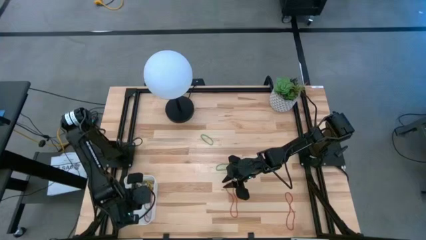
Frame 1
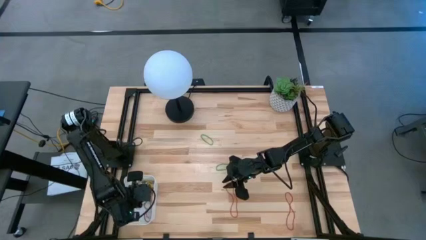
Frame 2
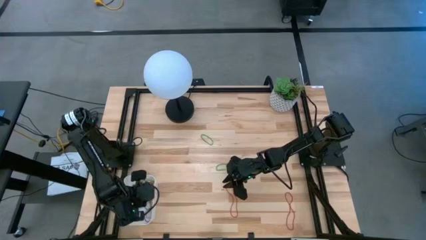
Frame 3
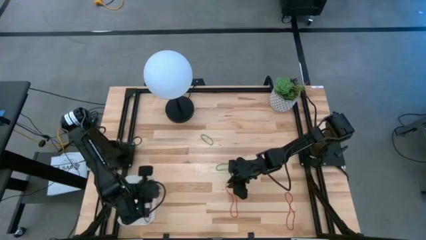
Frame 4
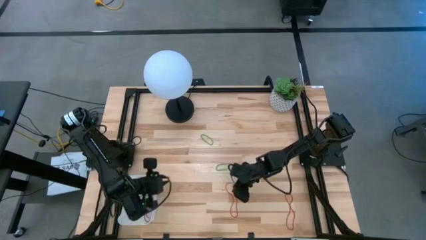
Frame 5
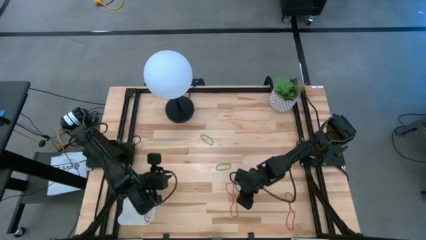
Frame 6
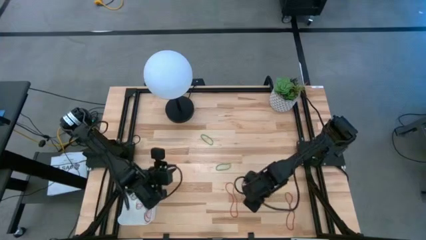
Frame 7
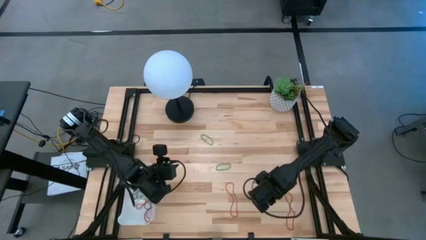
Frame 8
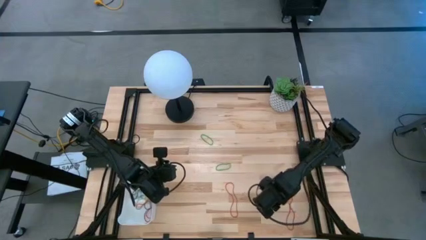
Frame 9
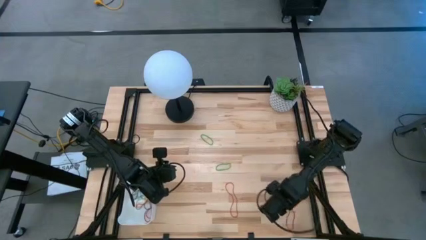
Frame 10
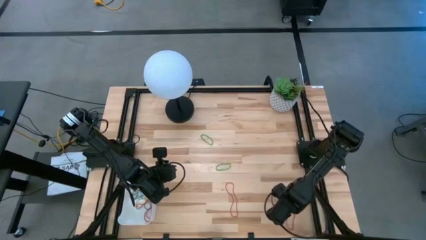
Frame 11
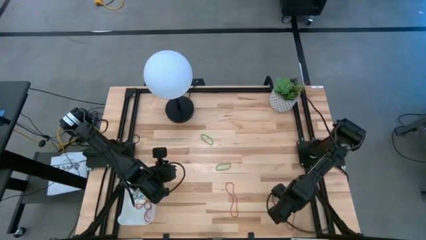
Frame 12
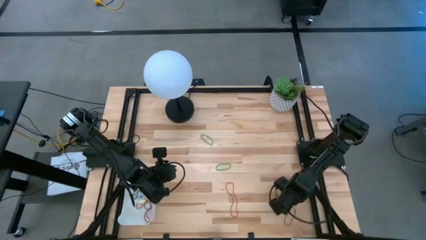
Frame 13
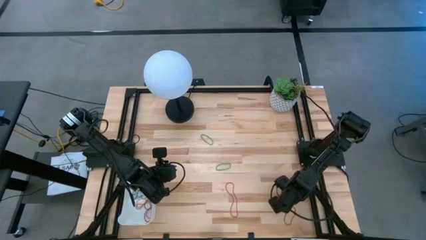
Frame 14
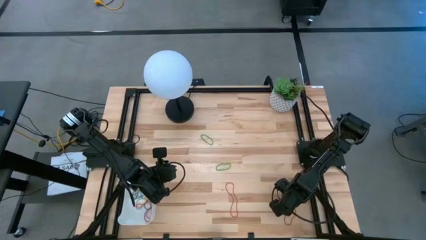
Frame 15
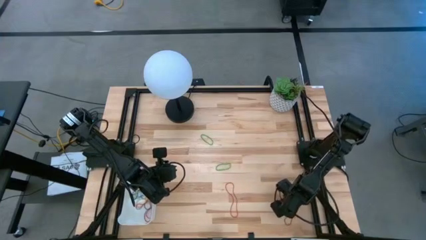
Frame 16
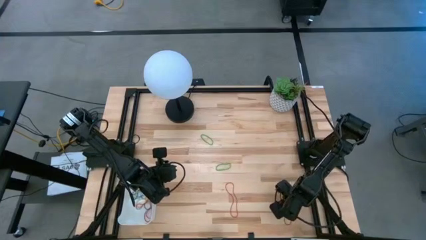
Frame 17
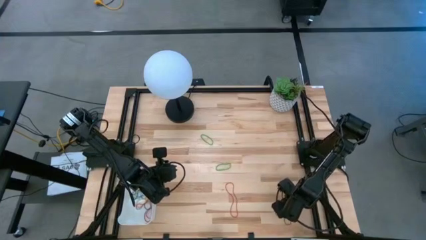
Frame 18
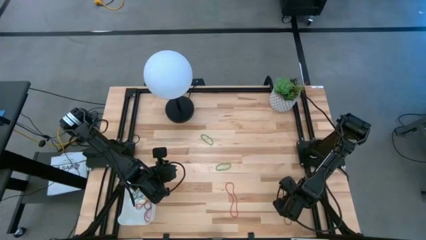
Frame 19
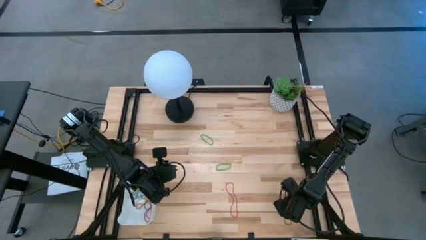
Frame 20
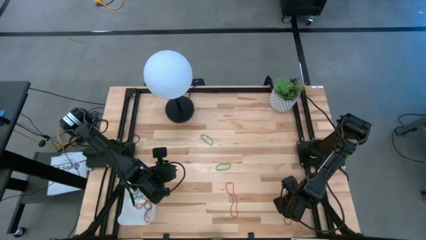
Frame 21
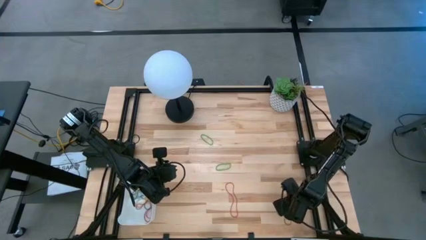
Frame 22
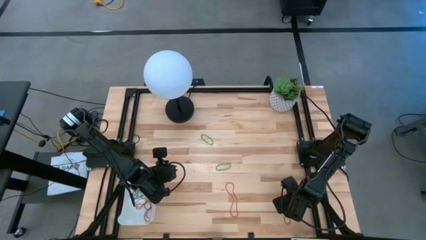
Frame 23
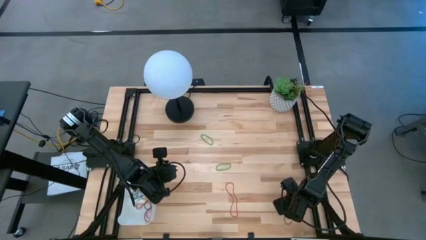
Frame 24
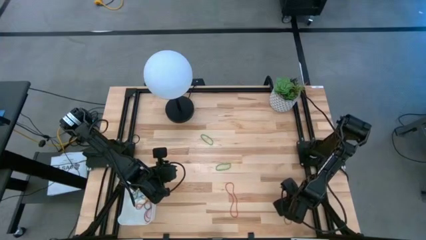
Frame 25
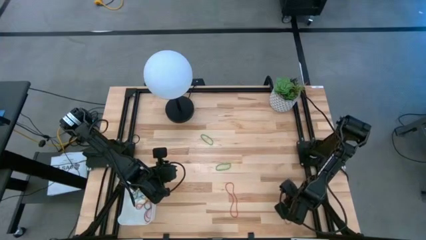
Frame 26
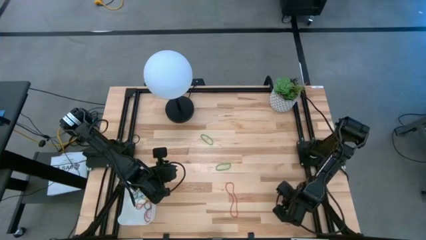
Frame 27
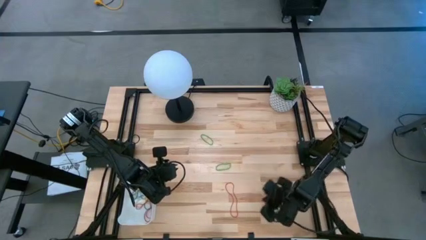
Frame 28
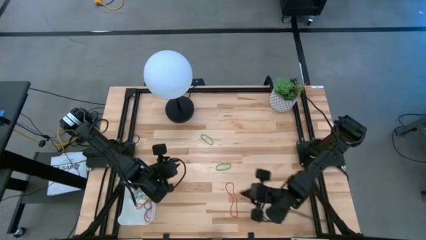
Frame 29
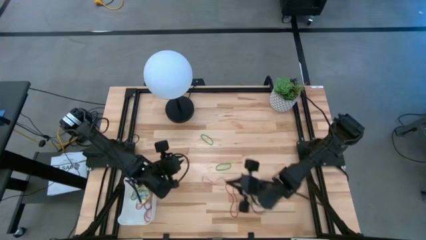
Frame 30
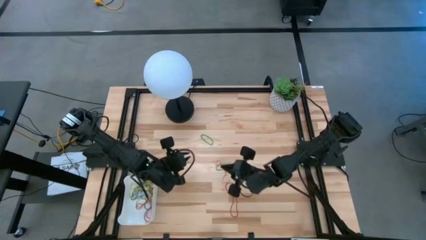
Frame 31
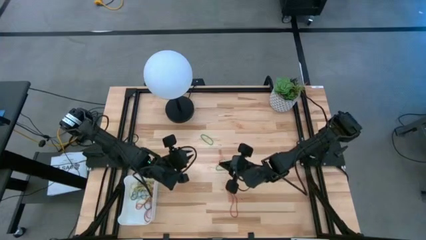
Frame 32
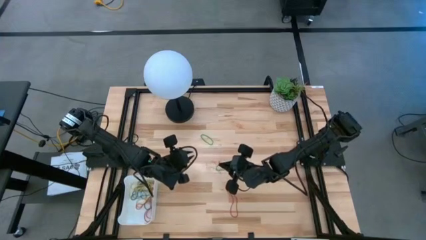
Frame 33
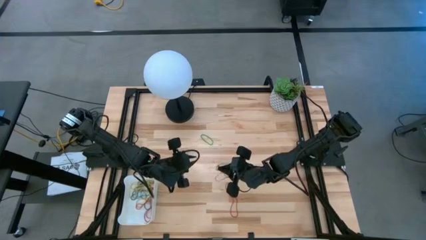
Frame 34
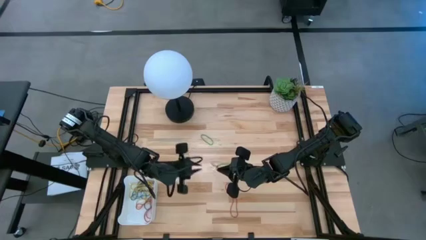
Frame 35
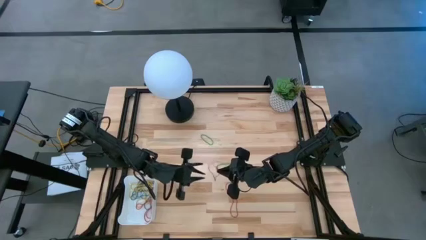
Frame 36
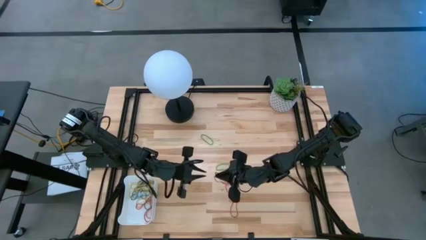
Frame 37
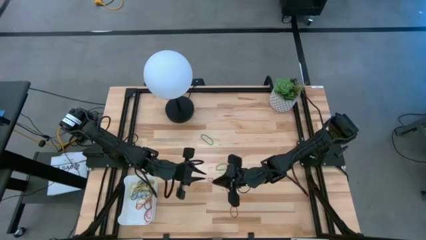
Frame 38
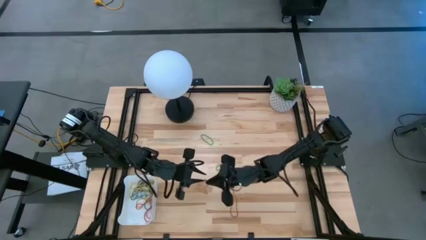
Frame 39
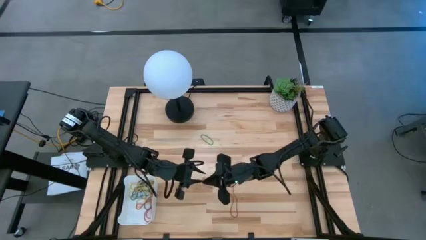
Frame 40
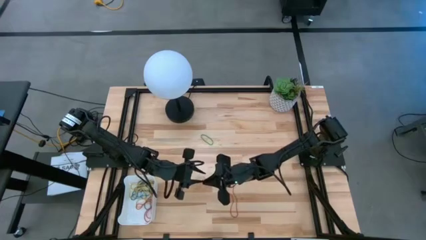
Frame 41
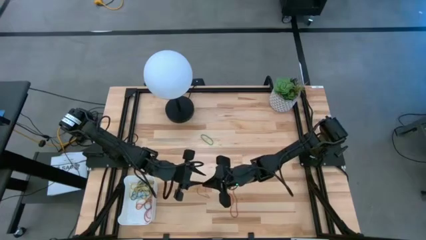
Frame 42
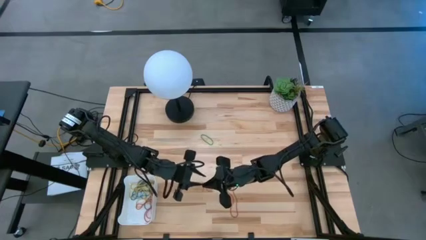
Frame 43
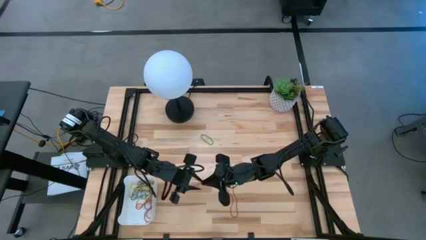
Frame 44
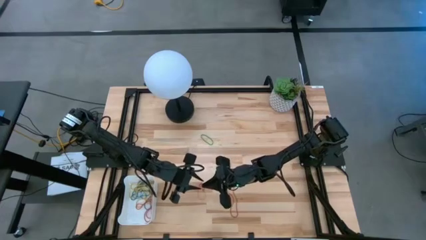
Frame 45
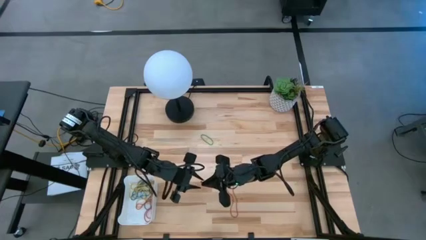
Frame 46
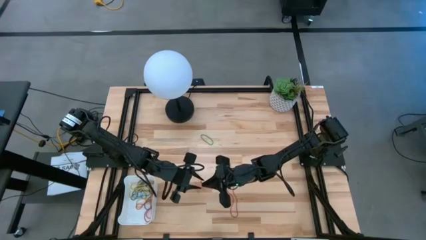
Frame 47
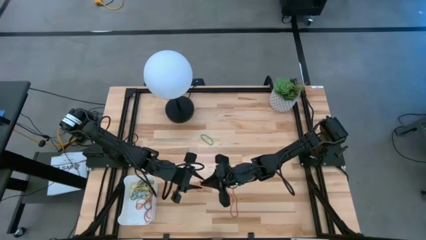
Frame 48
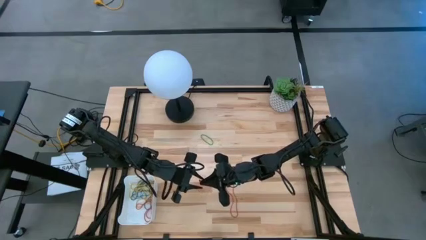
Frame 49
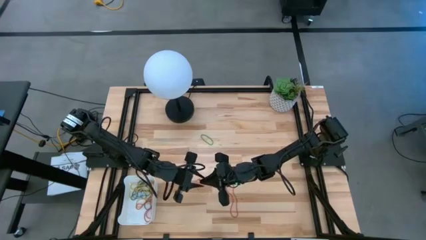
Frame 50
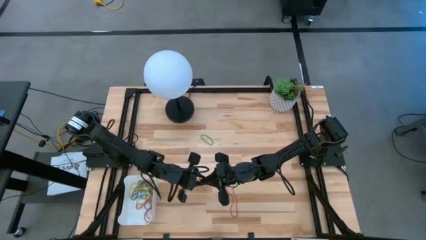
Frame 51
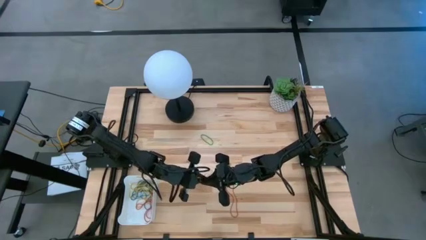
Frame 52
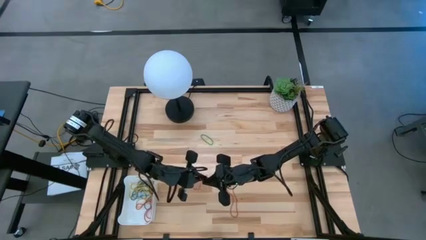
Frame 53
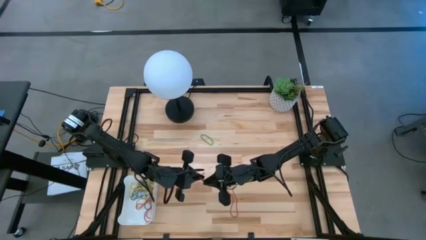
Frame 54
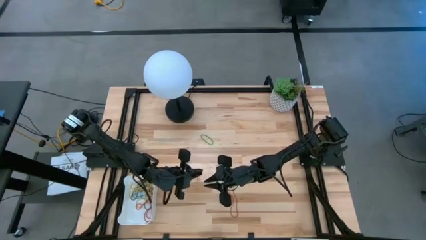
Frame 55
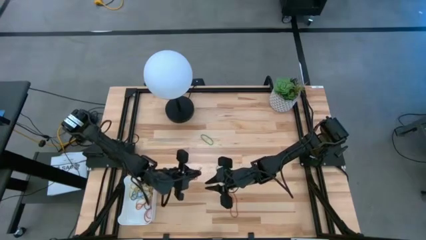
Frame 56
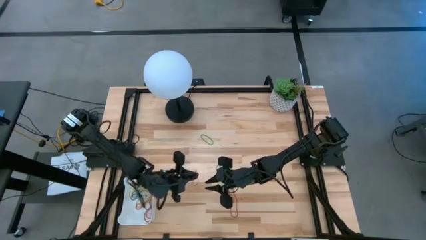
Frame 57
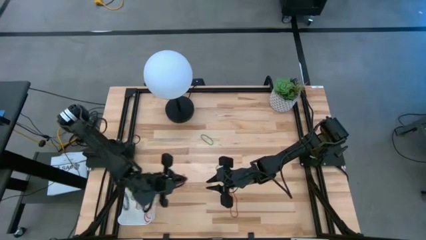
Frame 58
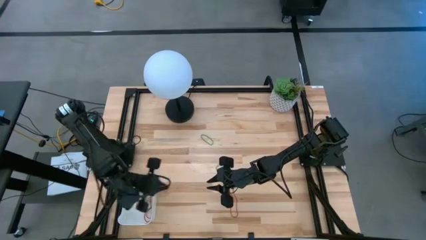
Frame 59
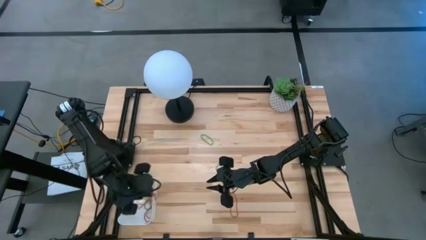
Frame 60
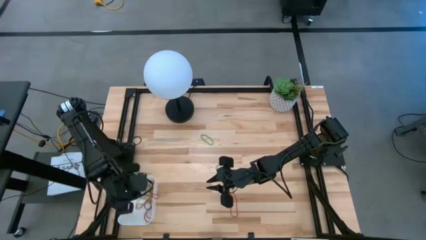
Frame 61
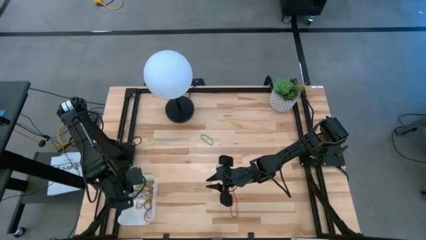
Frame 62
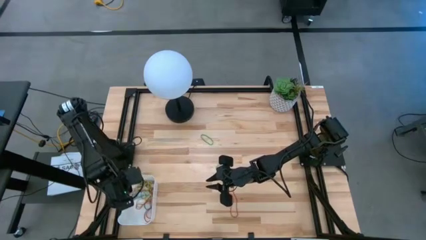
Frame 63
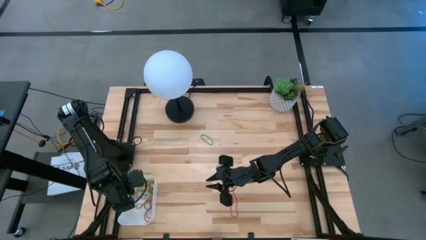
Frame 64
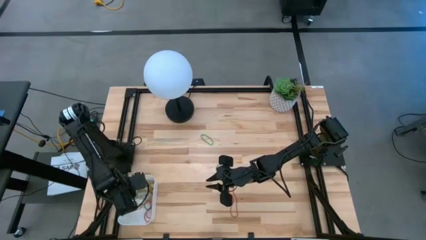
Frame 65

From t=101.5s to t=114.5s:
Task: Pick and place items into bin
Put the right red rubber band into the white bin

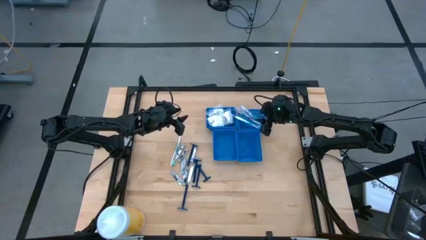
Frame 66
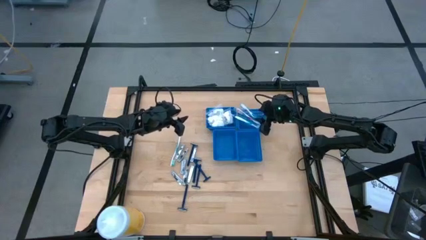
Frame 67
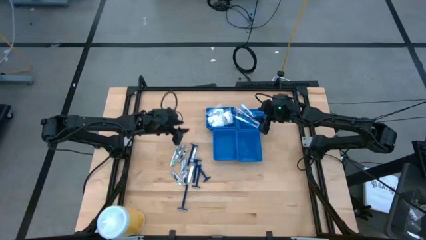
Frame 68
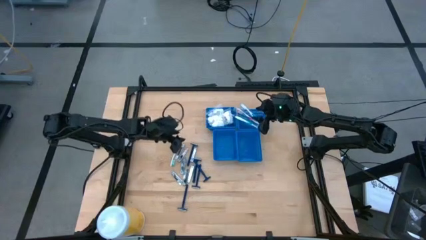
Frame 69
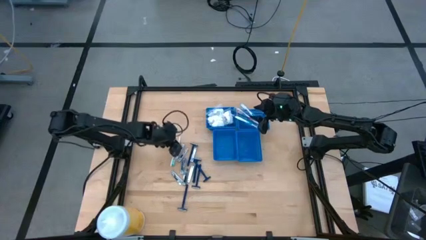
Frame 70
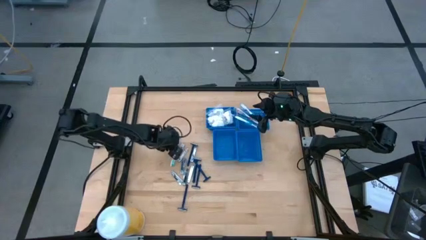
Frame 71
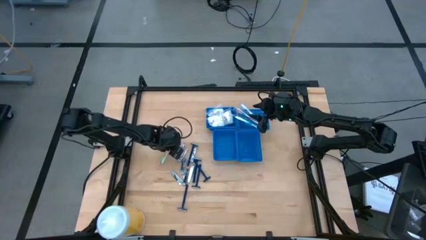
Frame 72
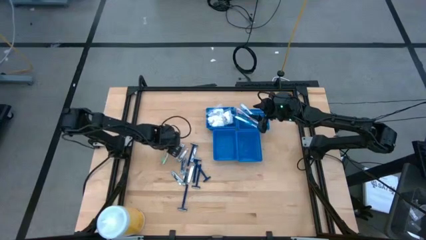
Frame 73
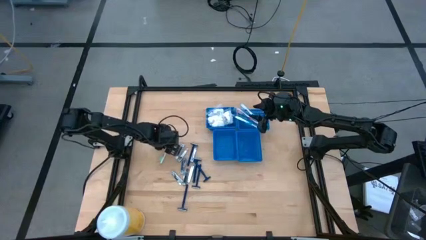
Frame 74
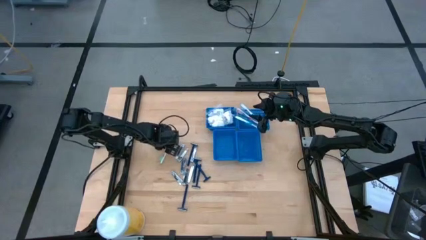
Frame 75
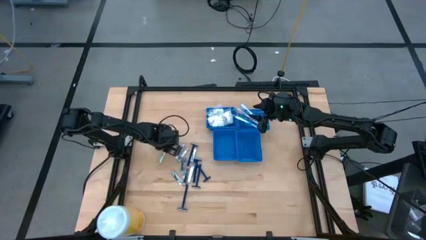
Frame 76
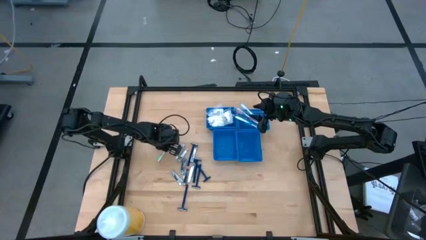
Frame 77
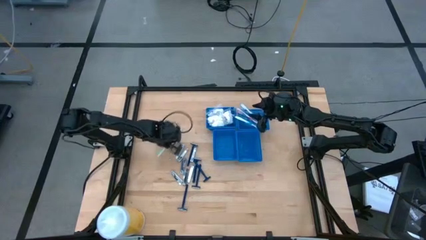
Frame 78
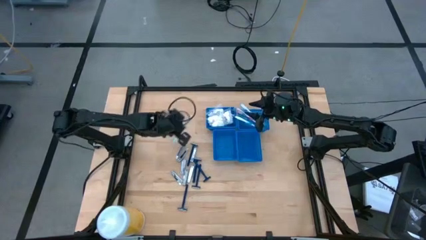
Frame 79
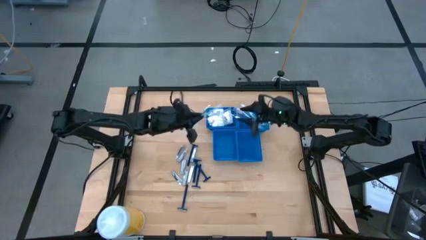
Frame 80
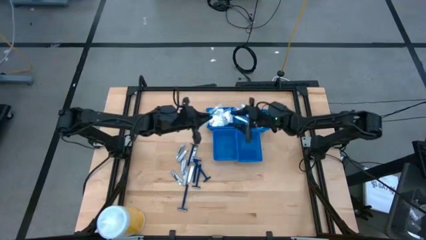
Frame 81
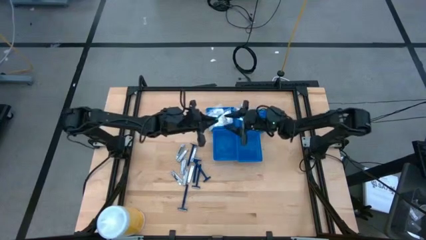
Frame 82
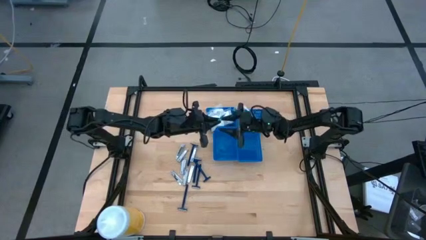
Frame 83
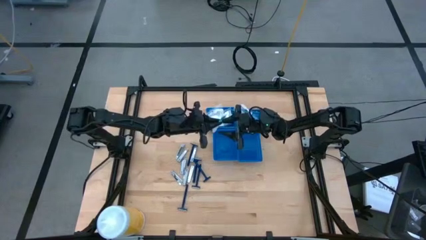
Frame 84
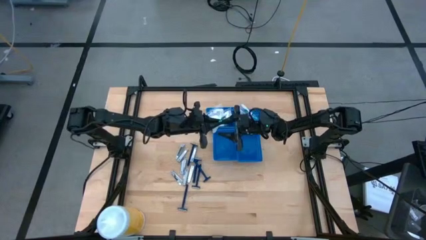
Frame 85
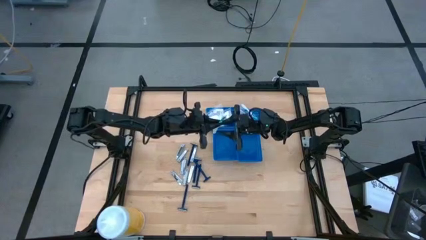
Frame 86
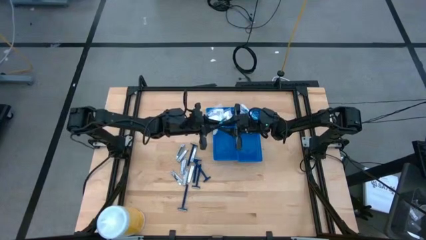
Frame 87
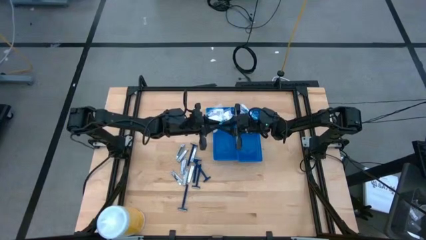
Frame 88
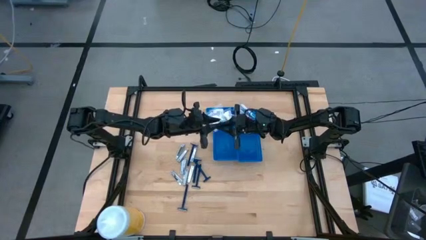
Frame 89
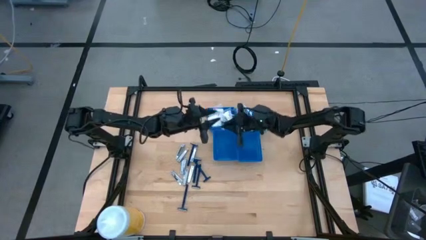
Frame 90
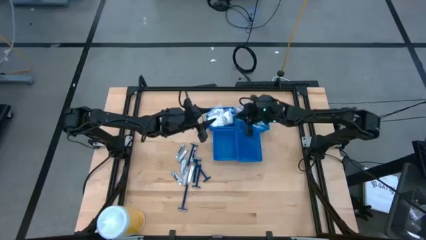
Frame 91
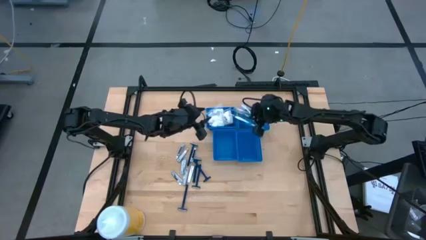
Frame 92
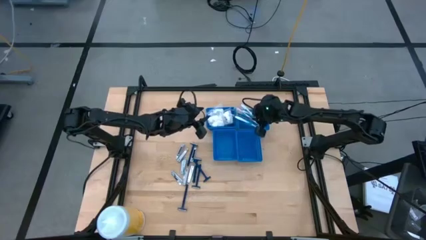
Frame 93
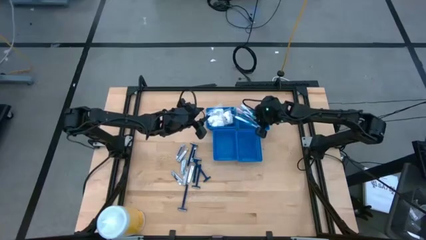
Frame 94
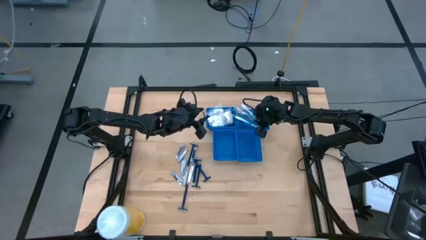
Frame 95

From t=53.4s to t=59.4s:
Task: Pick & Place Travel size toiletries
Put the green toothbrush into the top right blue basket
